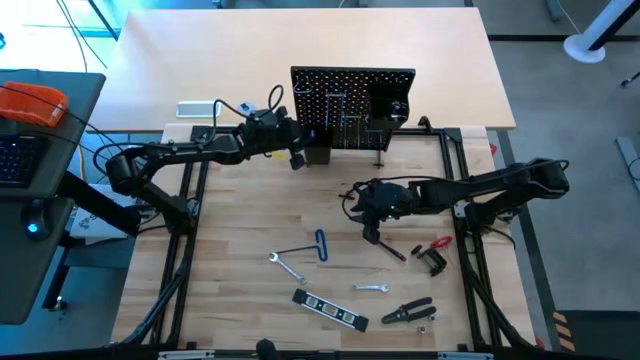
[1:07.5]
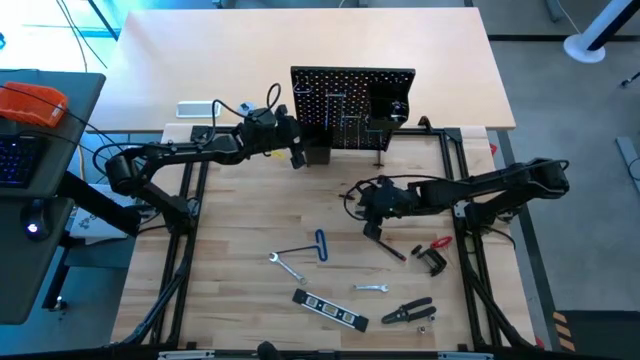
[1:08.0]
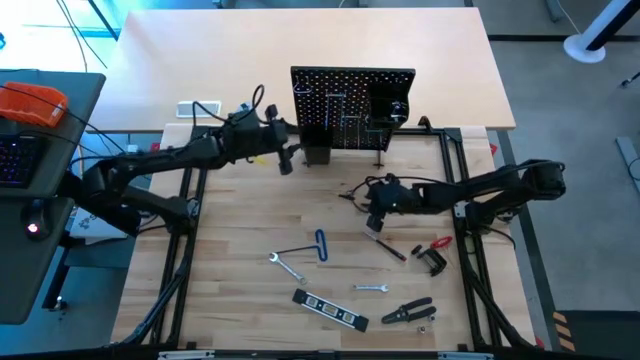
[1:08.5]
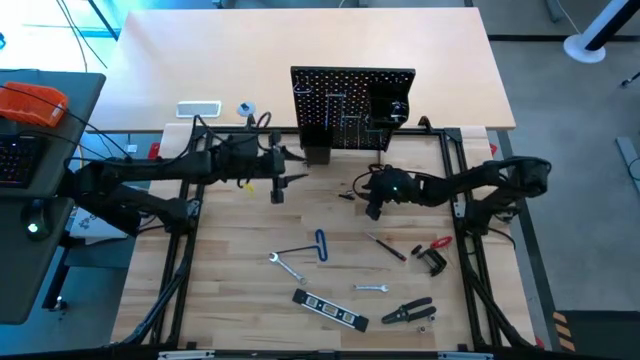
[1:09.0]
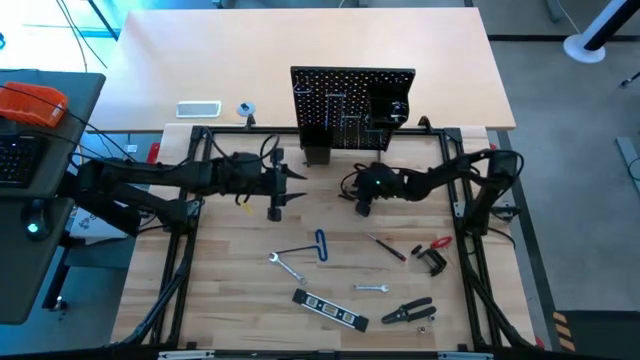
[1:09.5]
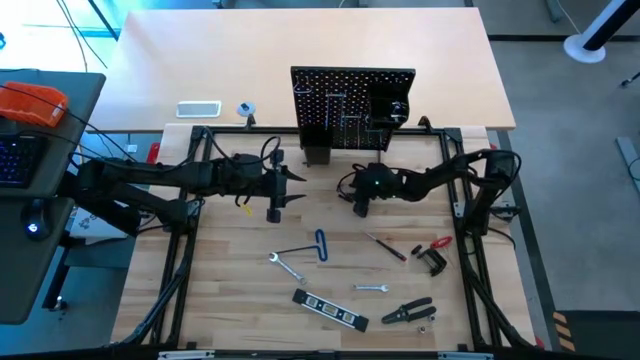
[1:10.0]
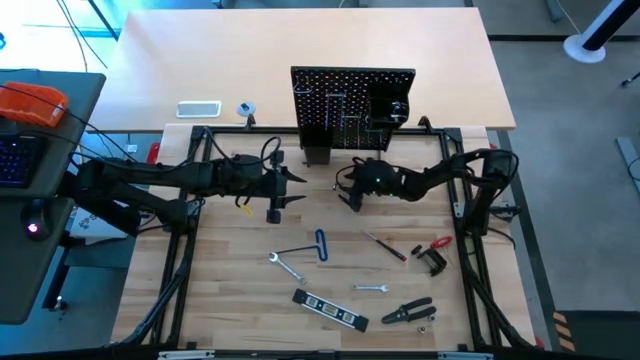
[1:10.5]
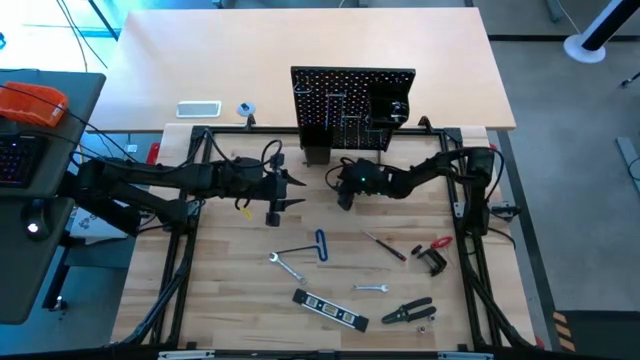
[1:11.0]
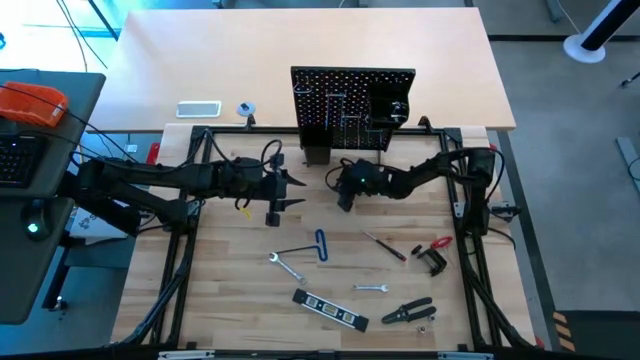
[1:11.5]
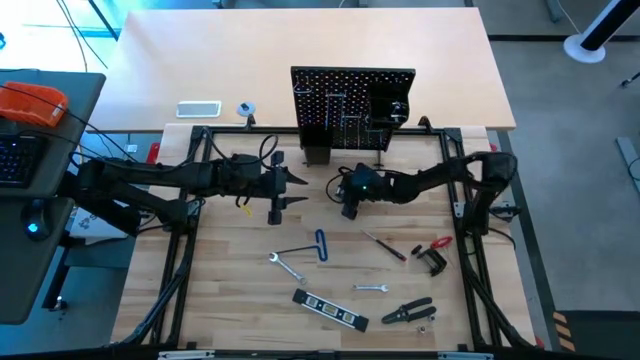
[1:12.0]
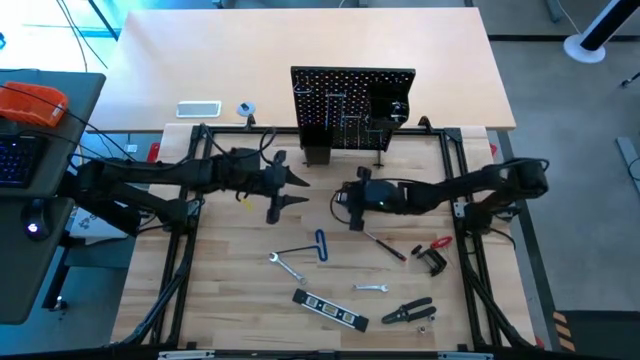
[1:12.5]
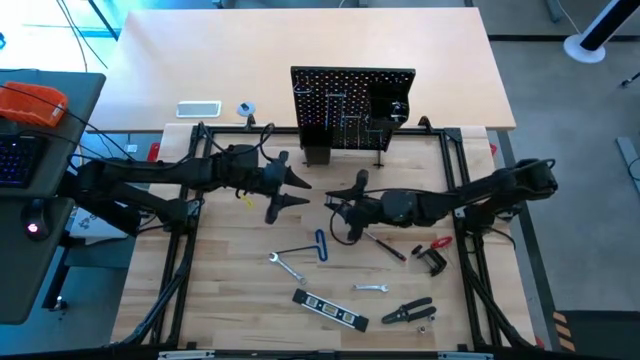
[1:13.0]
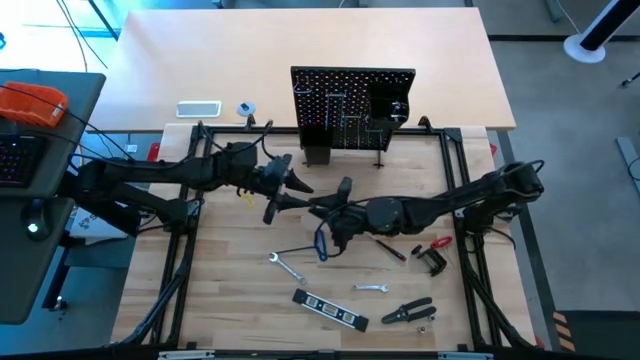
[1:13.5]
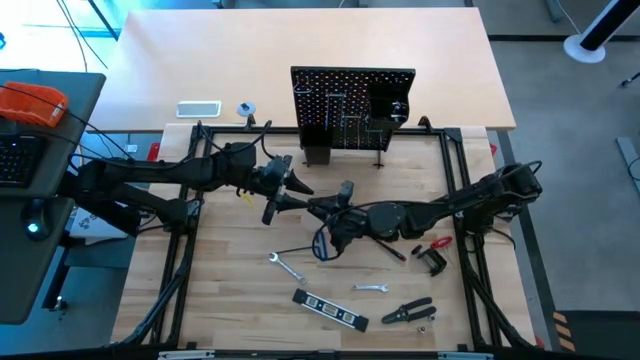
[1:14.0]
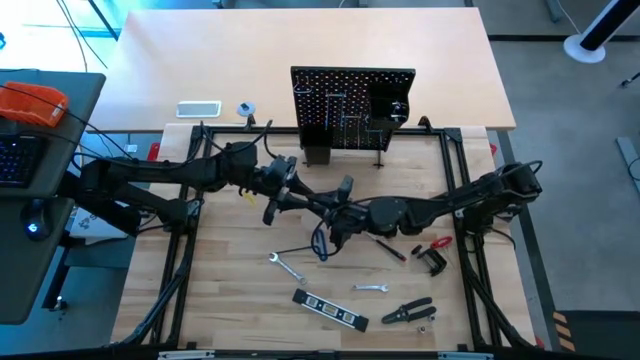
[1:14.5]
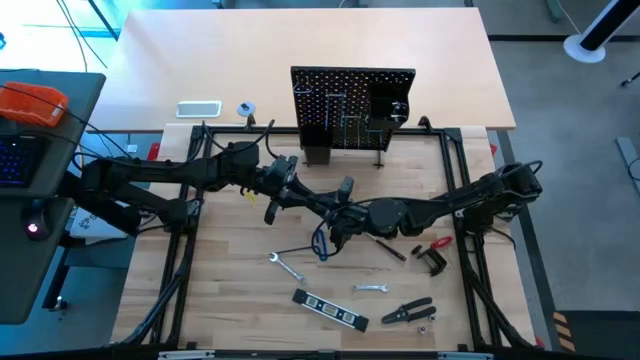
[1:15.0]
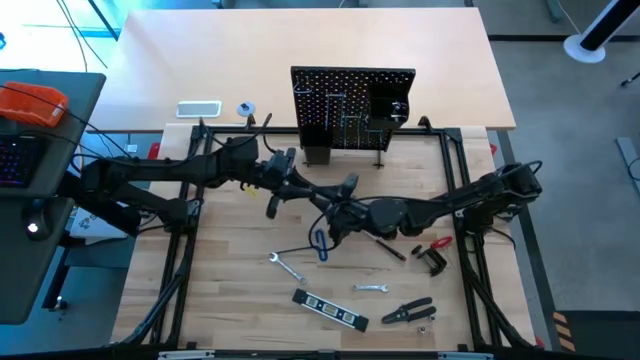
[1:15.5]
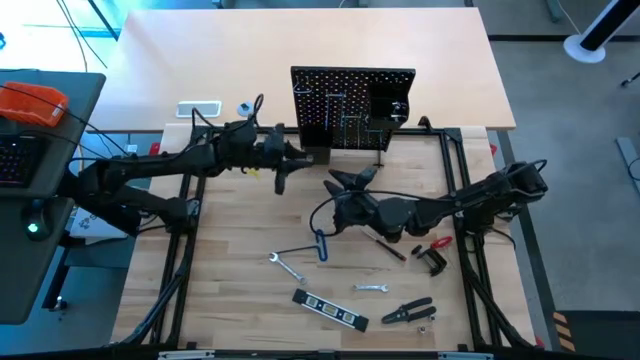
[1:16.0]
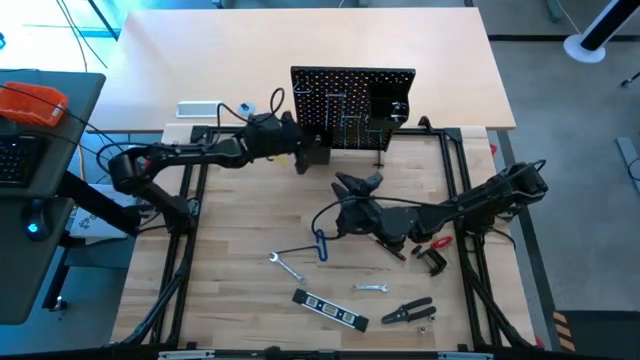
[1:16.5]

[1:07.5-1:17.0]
Task: Hang tools onto peg board
Put the bolts on the pegboard

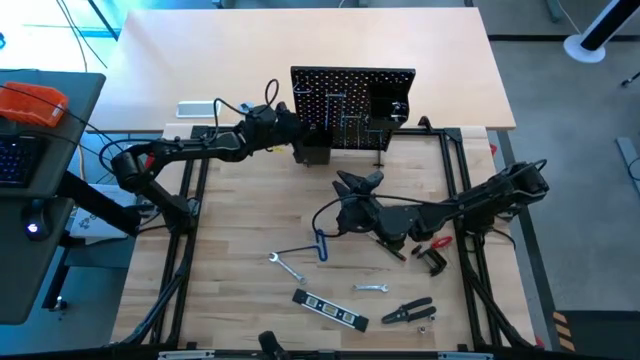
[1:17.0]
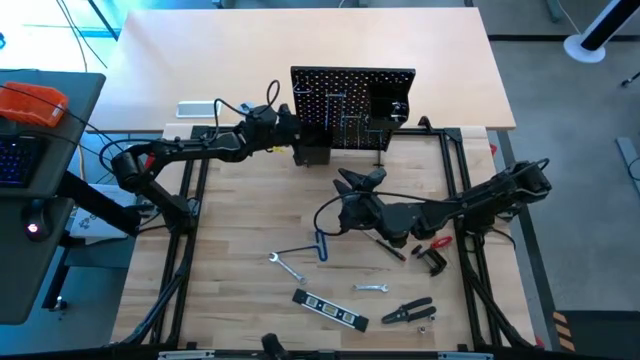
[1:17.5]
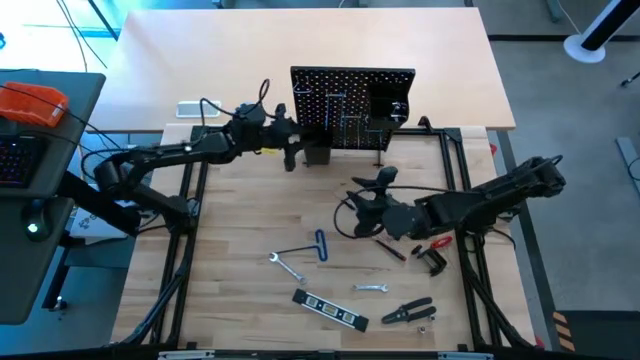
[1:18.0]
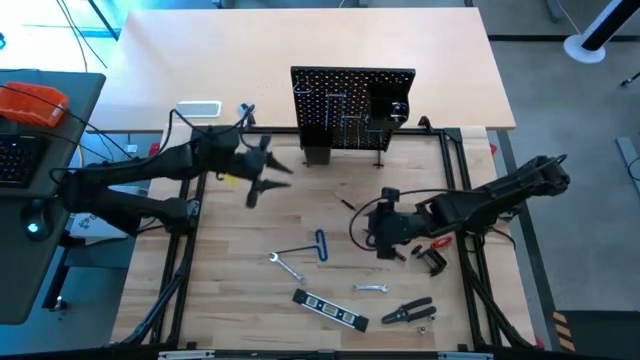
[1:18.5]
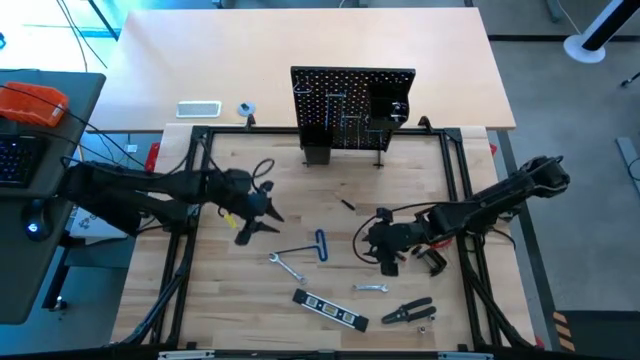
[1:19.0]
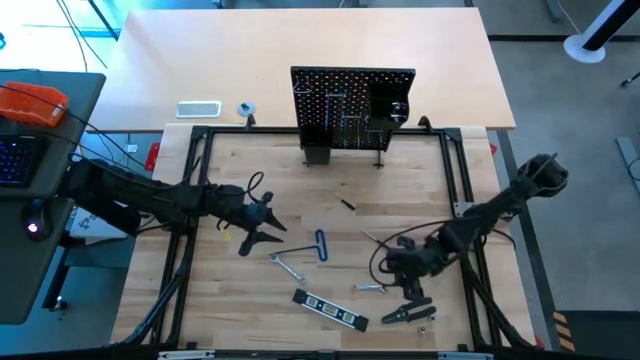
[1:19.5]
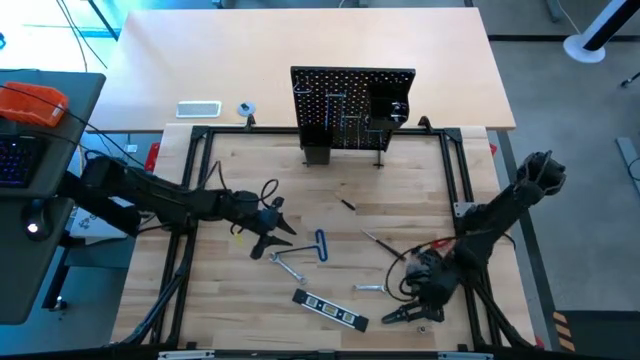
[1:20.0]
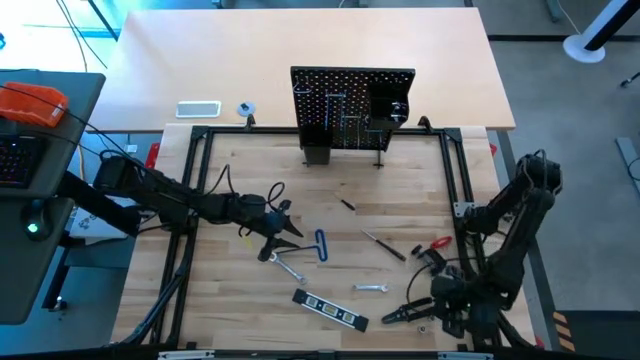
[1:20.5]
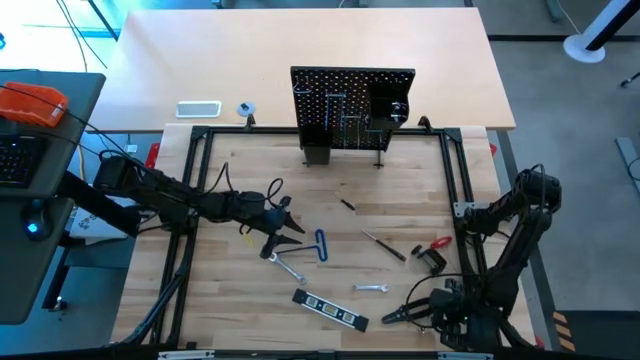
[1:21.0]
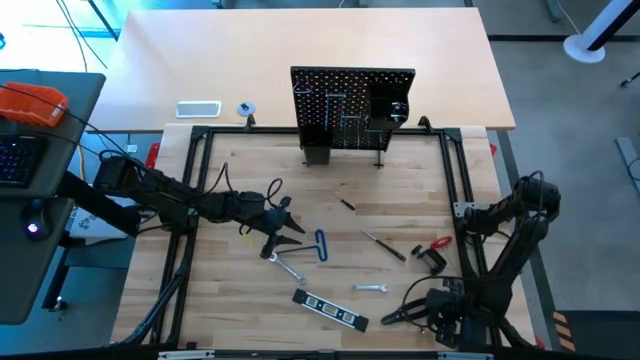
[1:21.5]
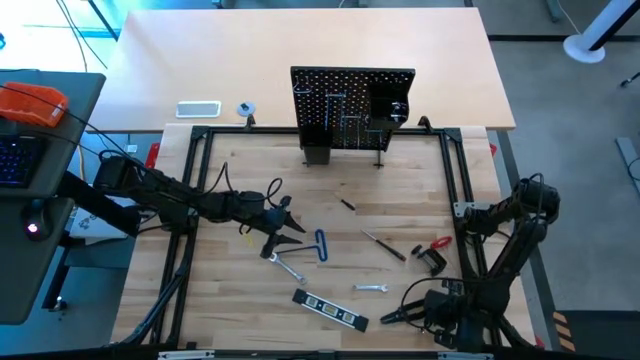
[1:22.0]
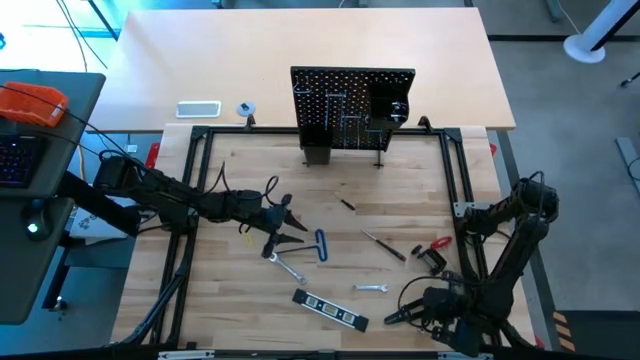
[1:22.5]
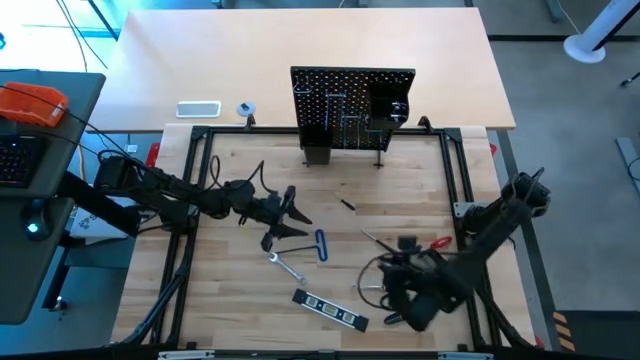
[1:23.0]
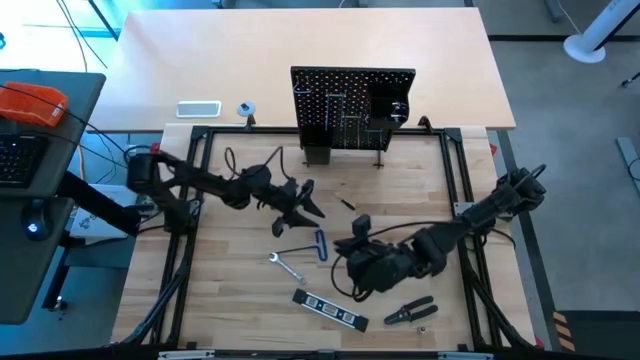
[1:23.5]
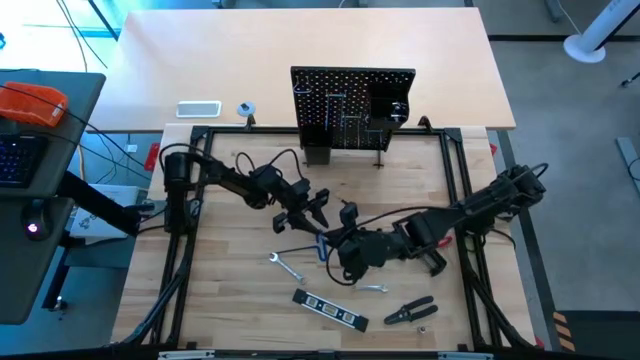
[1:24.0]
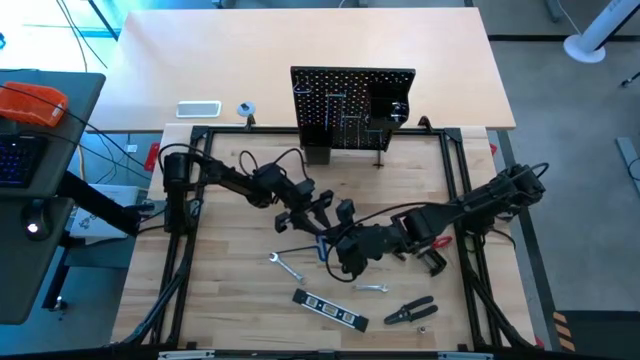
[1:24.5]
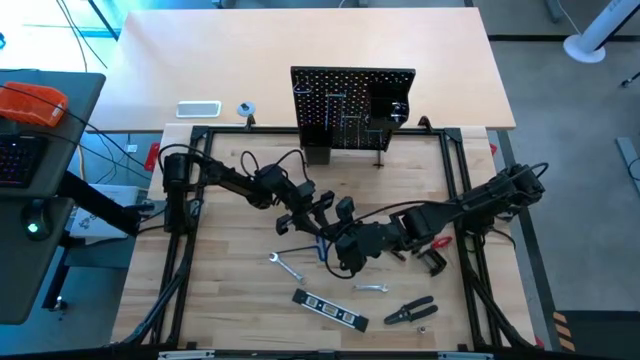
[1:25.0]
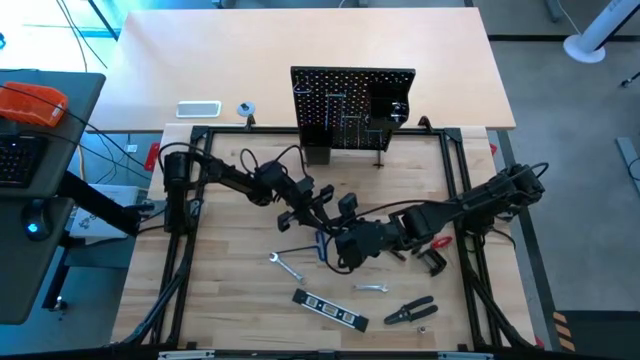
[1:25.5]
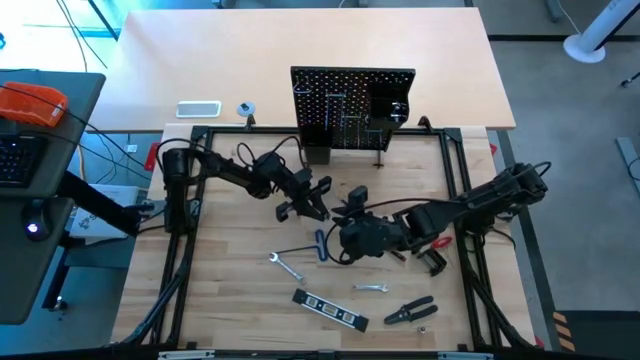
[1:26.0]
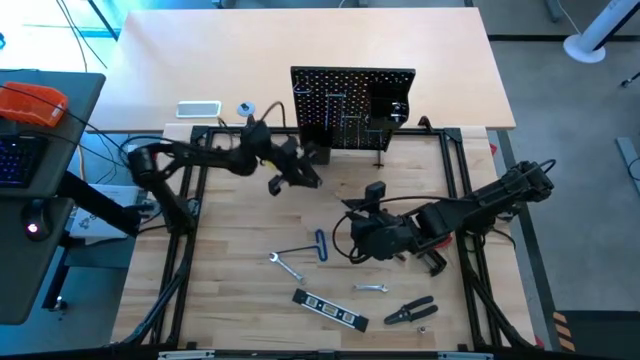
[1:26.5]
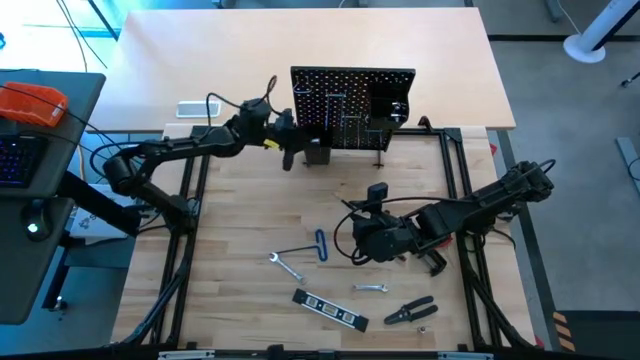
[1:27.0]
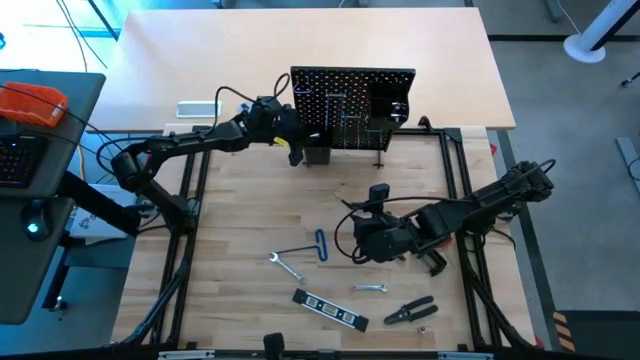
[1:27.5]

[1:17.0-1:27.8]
Put the bolts on the pegboard

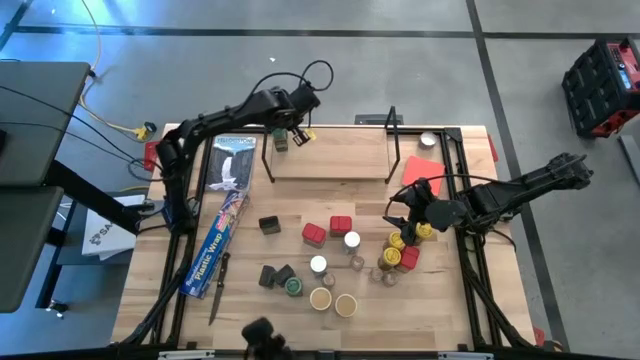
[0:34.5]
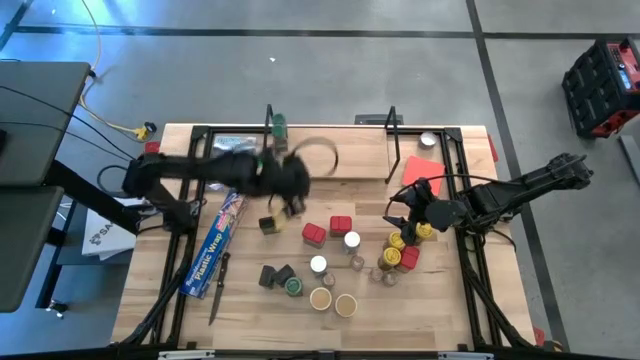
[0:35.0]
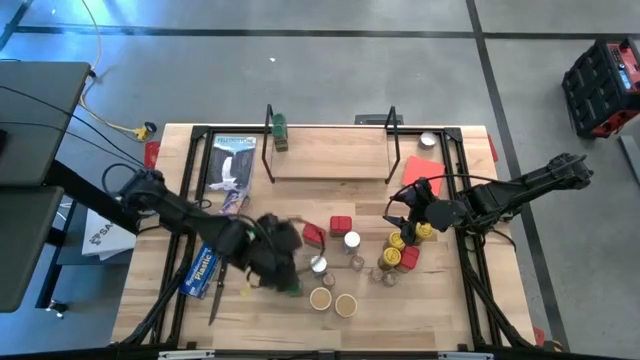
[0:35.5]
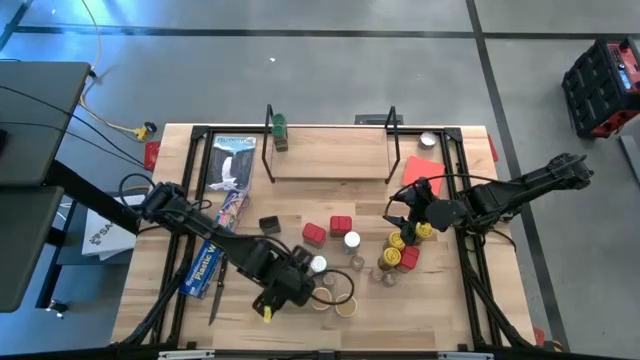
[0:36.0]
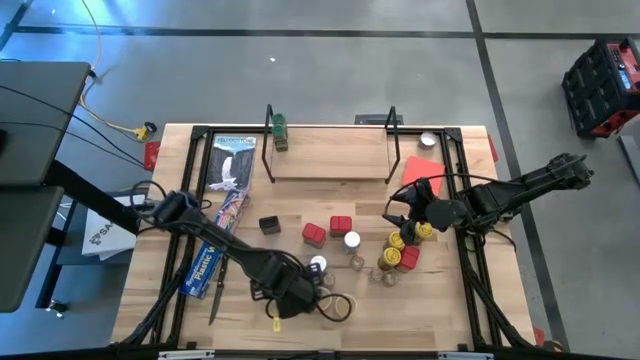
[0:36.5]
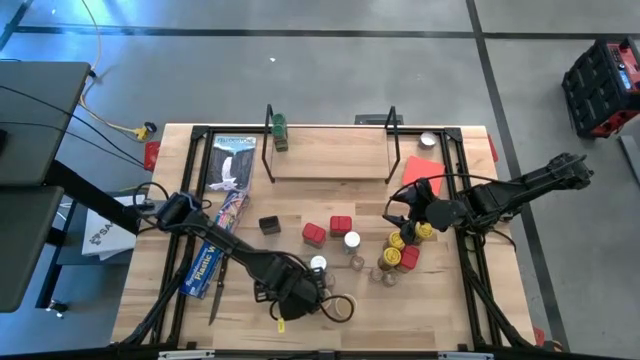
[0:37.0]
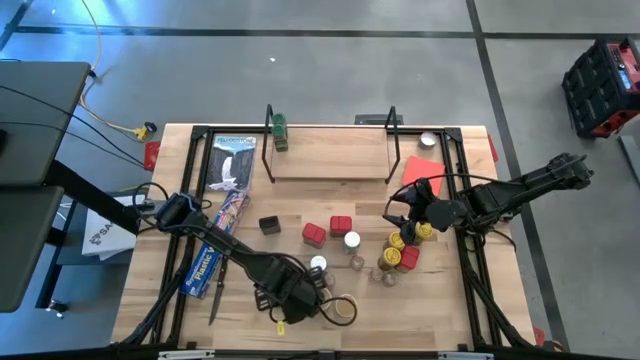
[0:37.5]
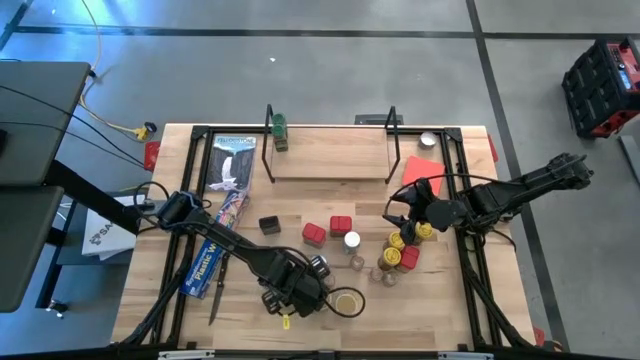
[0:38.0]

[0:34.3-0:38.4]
Task: Shelf spices
Put the green seasoning bottle on the shelf and align it with the other green seasoning bottles
